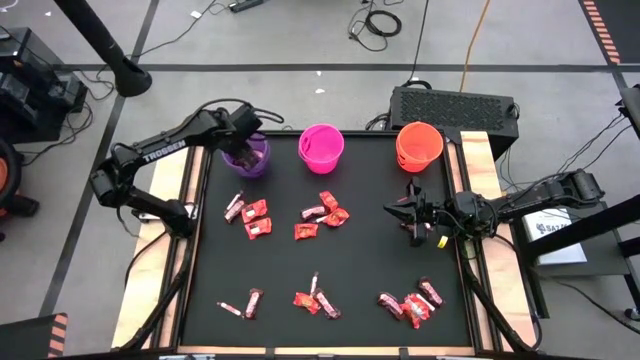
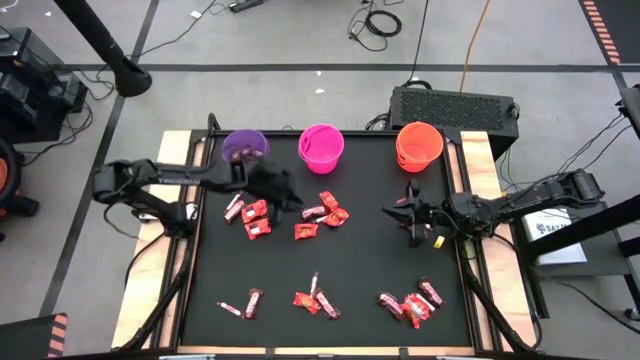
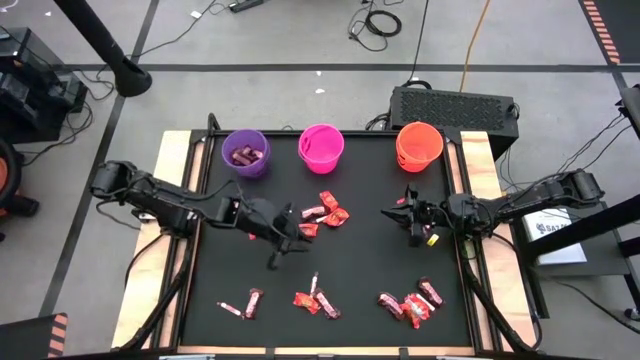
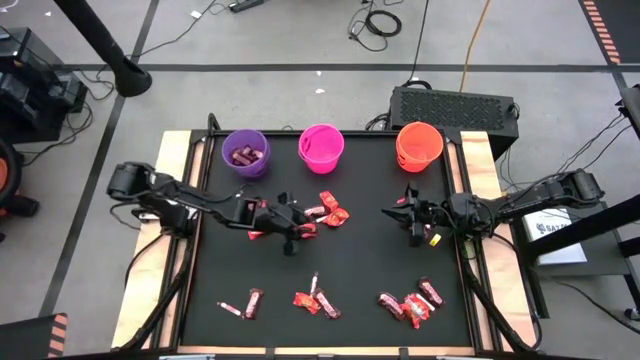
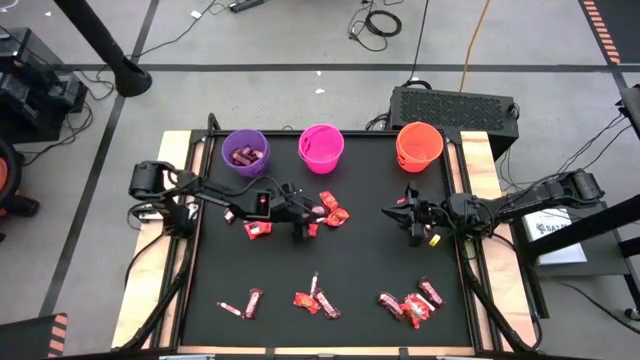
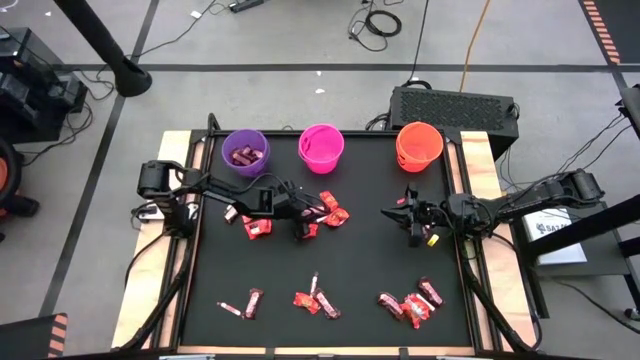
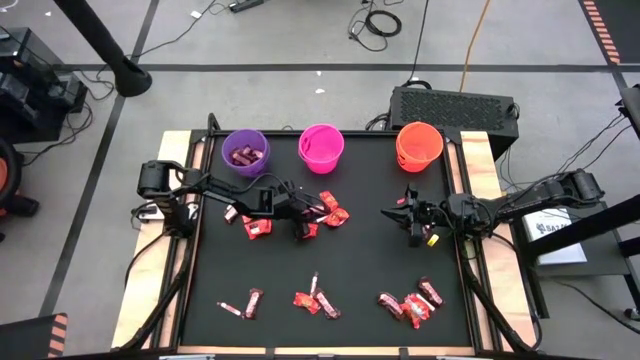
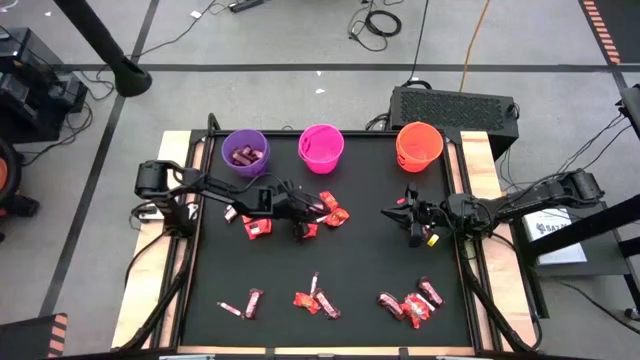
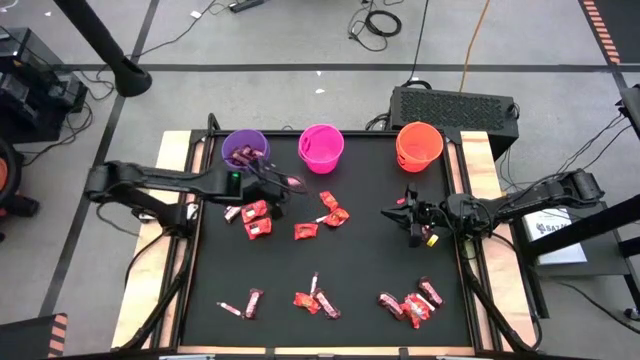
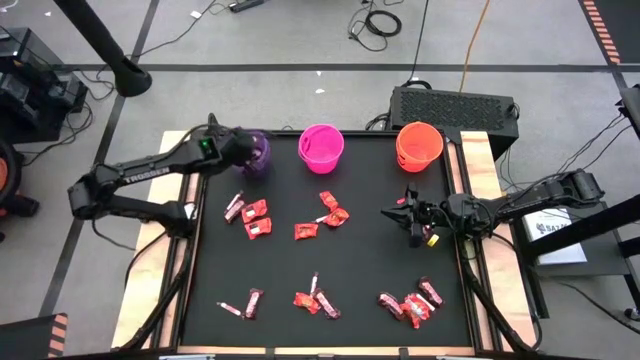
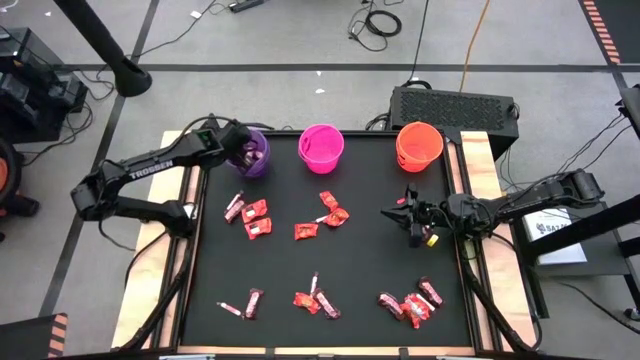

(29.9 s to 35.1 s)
Task: Sort candy by brand, put in halloween buckets
Put the brown chocolate bar into the purple bucket

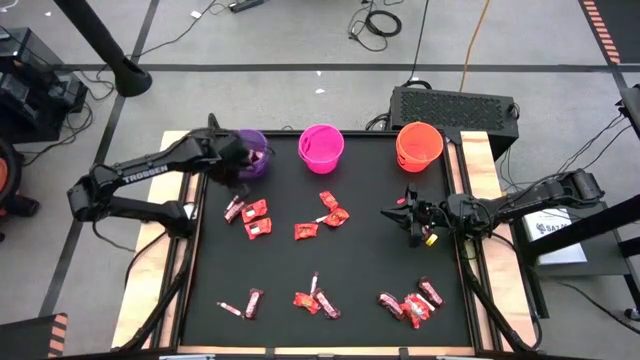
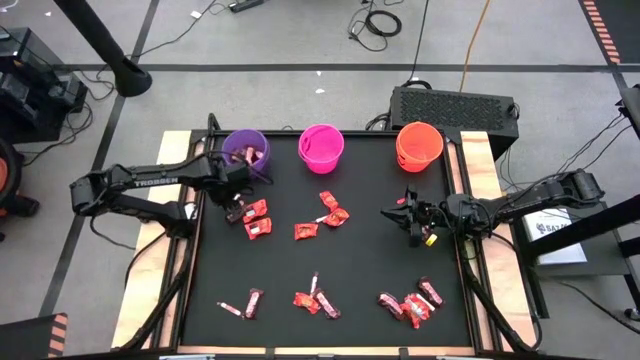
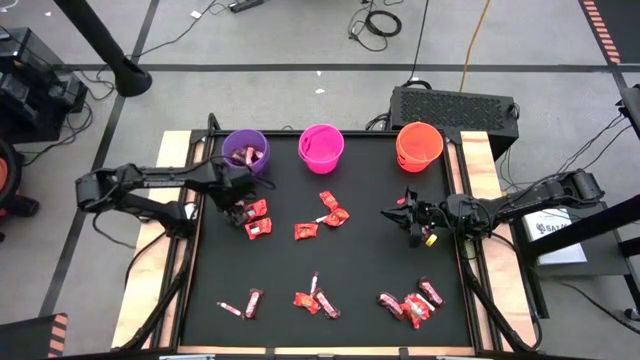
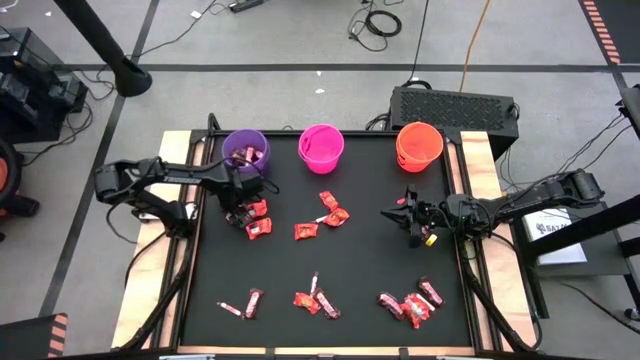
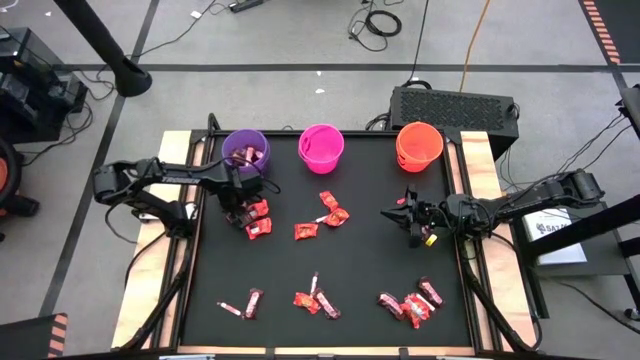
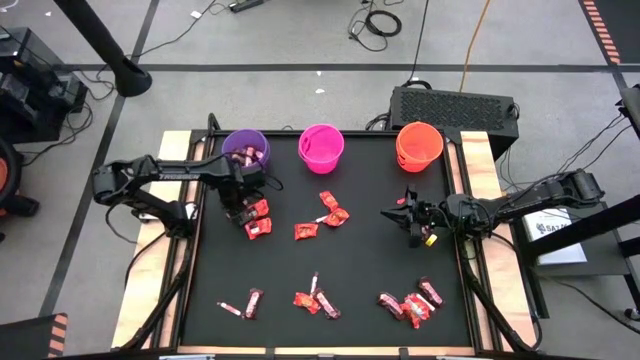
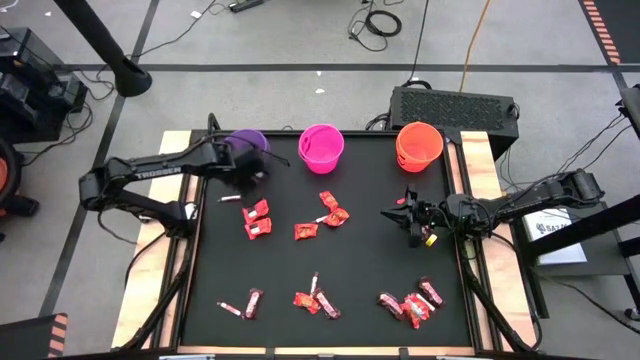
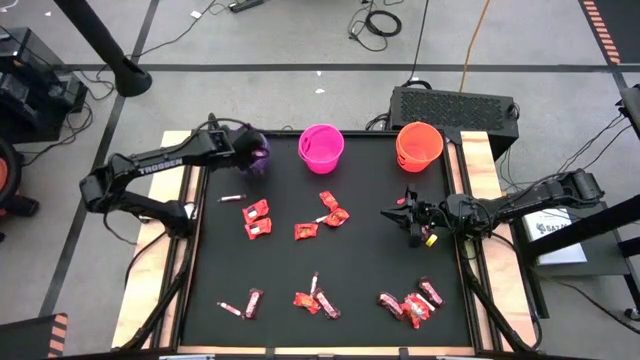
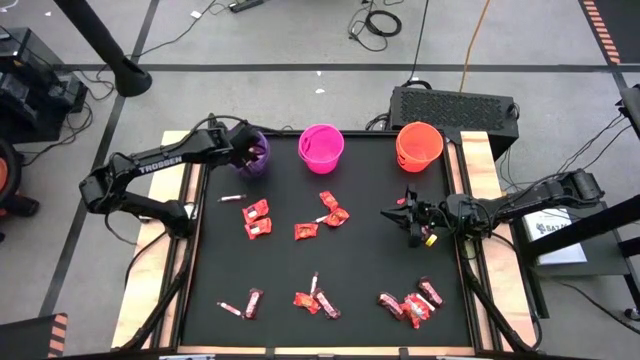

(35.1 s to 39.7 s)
Put the brown chocolate bar into the purple bucket

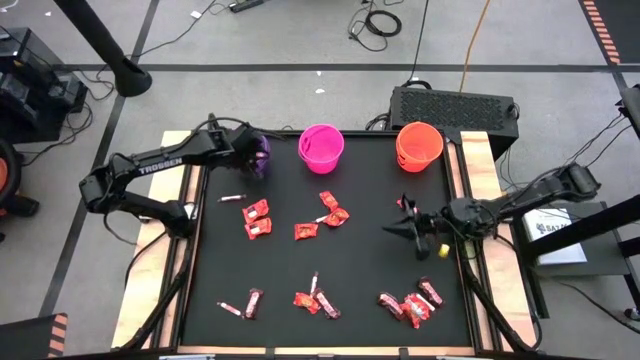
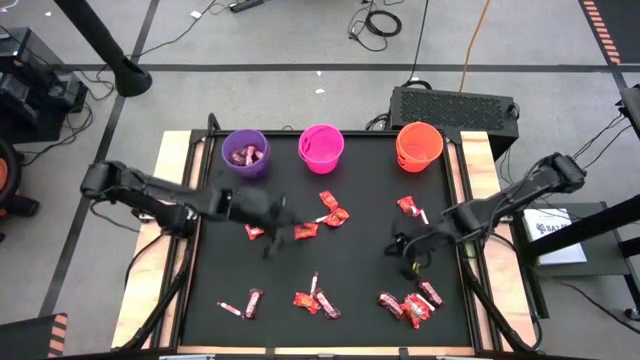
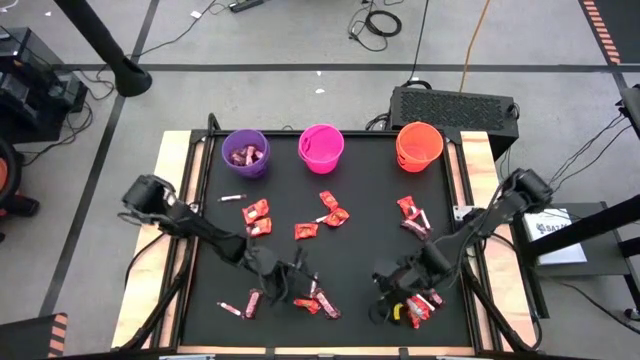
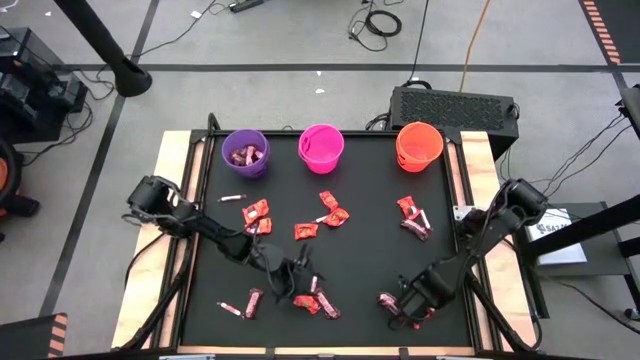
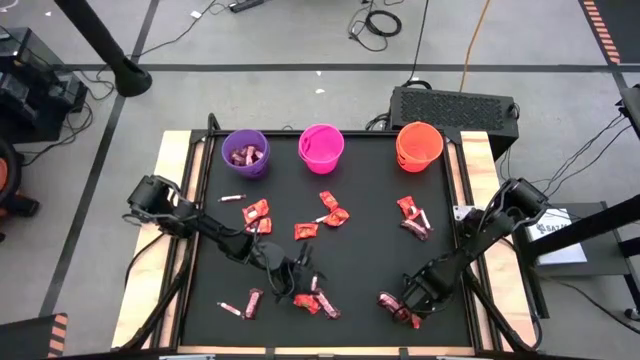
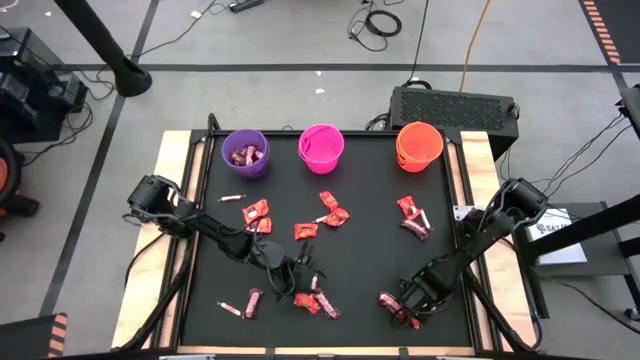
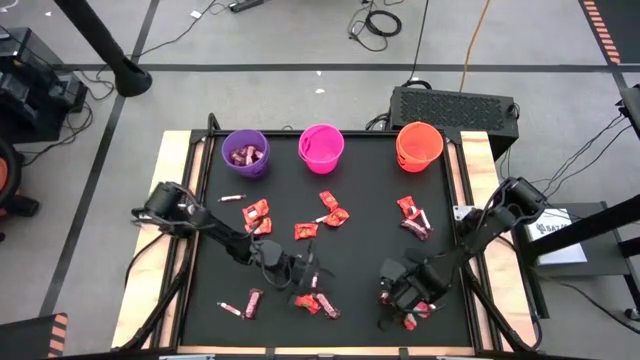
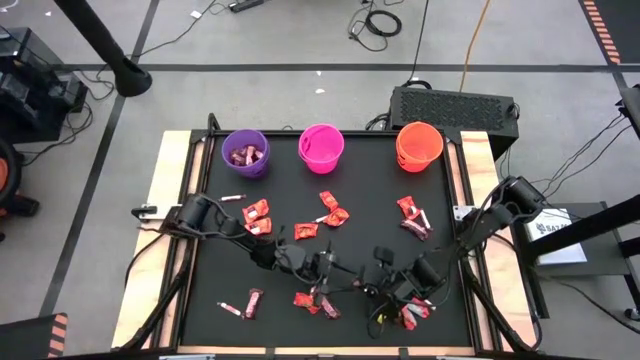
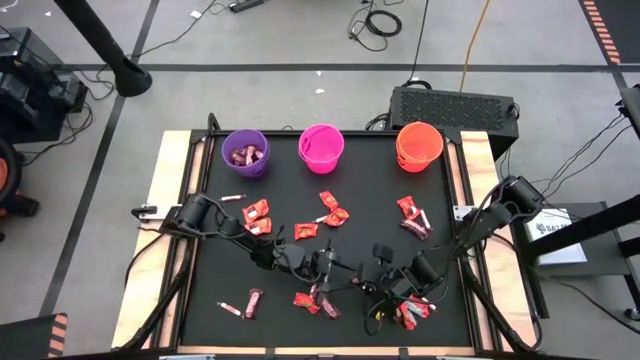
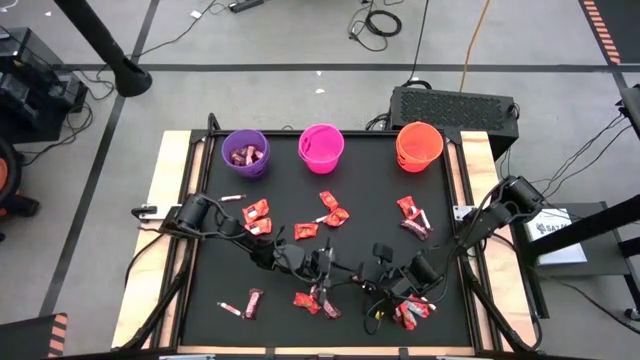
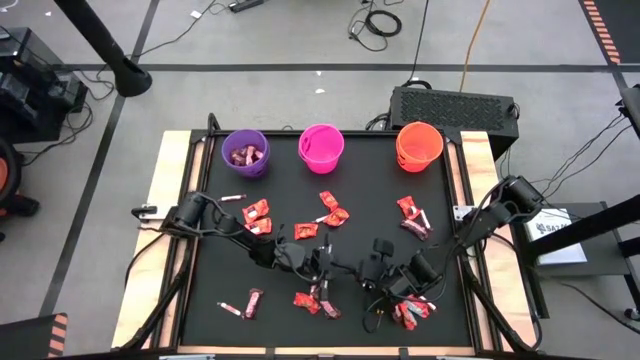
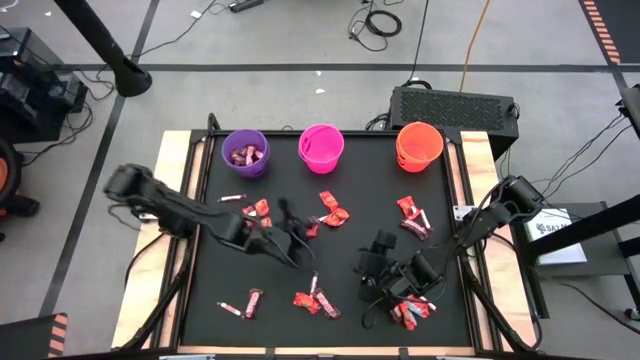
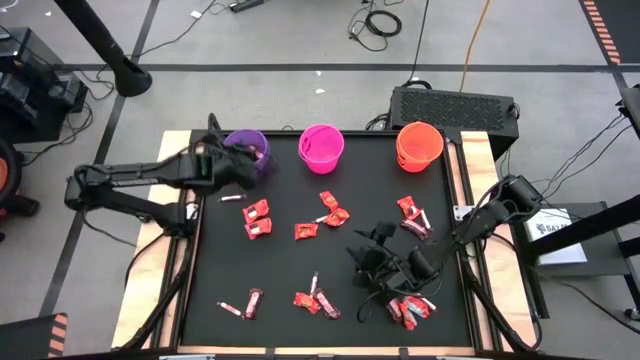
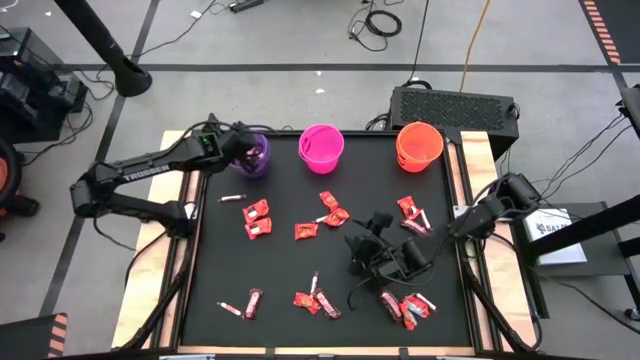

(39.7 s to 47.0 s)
Put the brown chocolate bar into the purple bucket

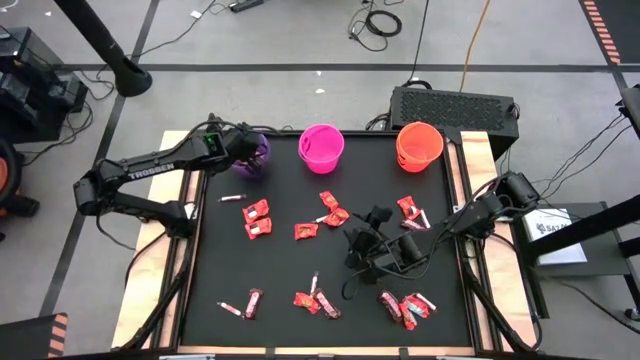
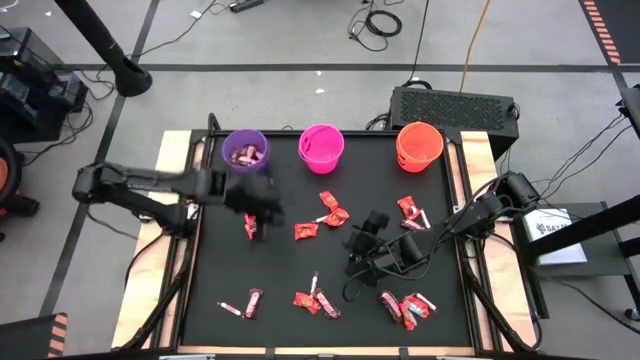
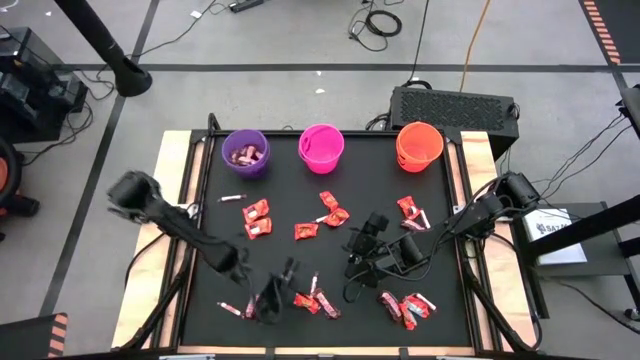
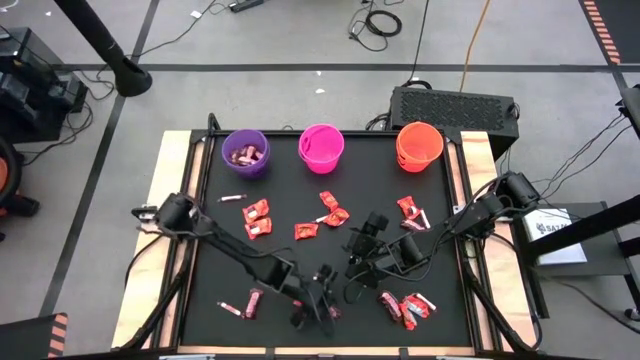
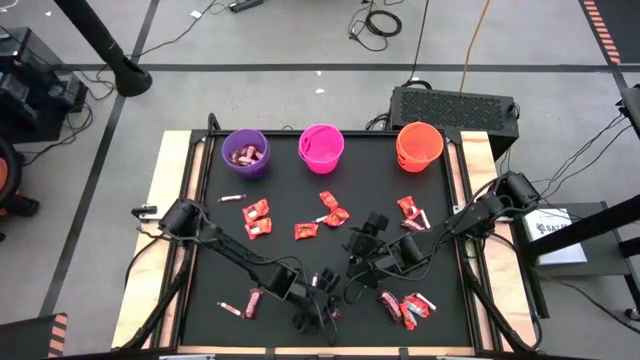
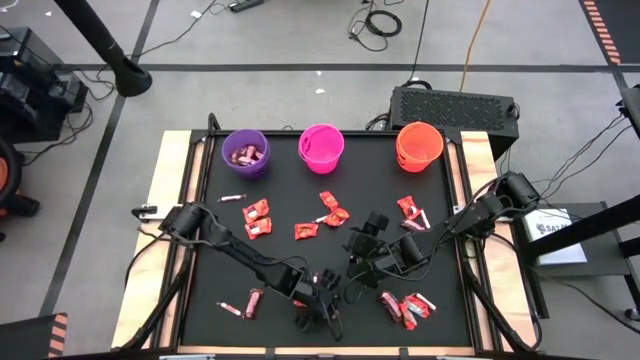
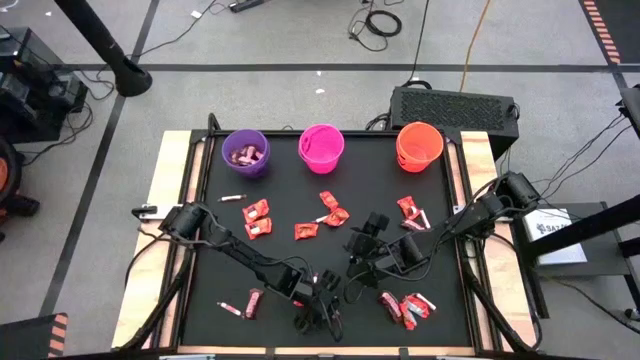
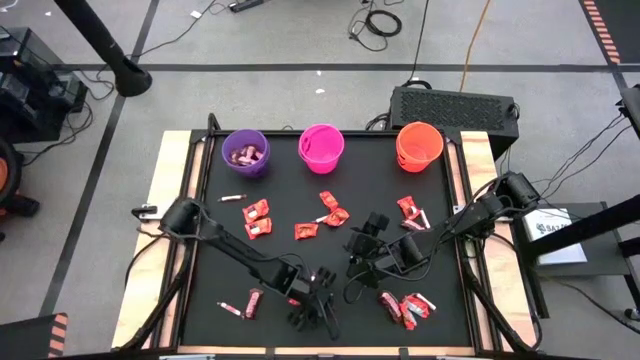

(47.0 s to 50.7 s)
Put the brown chocolate bar into the purple bucket
